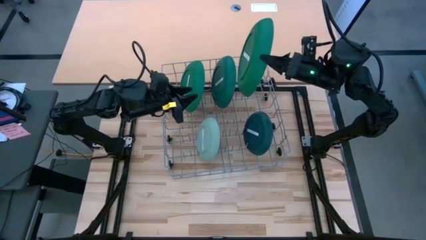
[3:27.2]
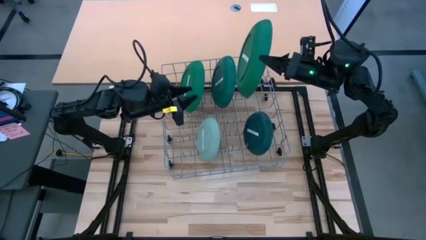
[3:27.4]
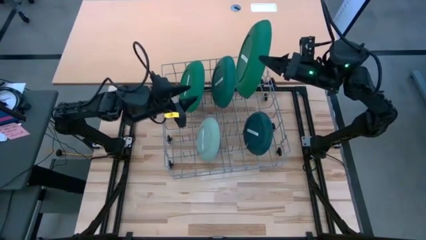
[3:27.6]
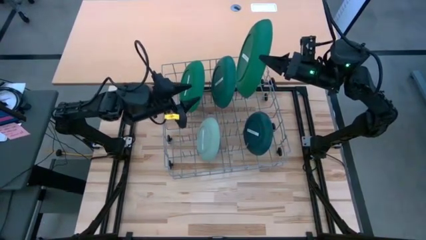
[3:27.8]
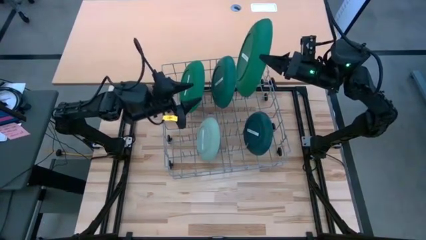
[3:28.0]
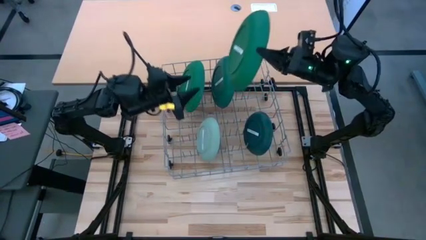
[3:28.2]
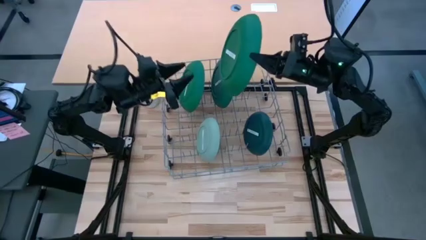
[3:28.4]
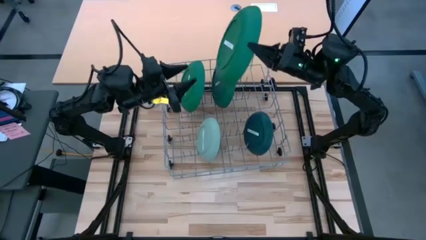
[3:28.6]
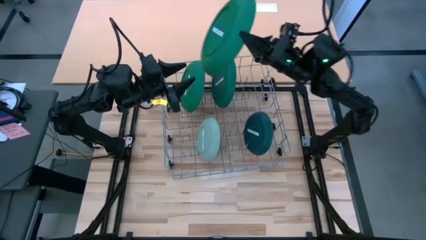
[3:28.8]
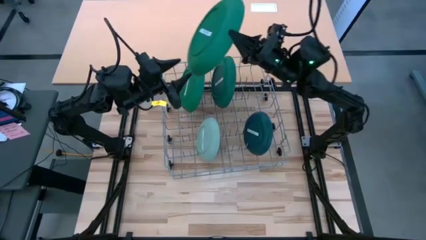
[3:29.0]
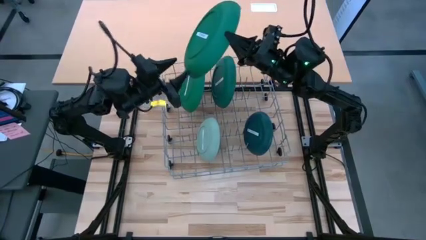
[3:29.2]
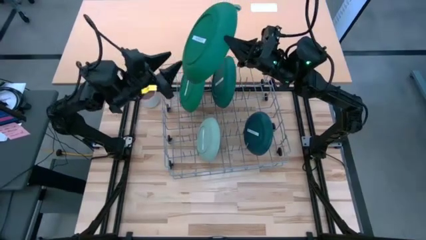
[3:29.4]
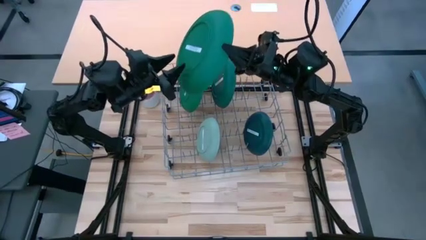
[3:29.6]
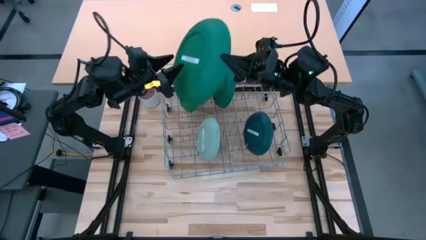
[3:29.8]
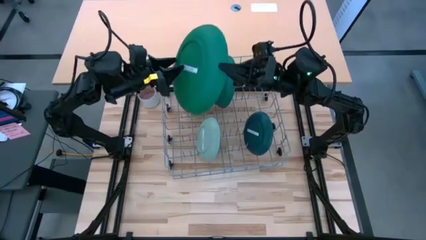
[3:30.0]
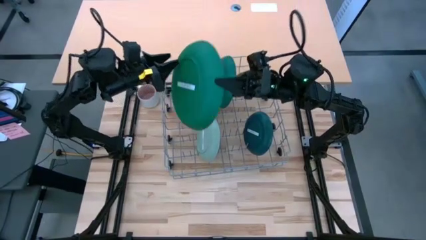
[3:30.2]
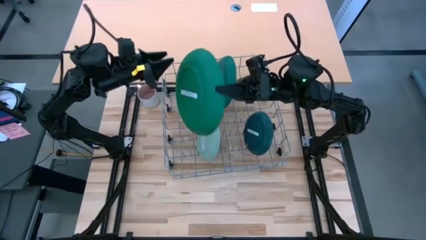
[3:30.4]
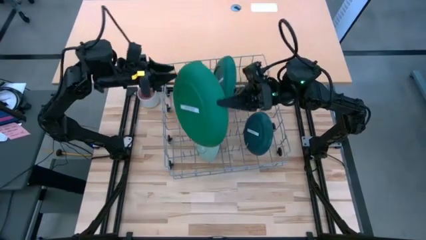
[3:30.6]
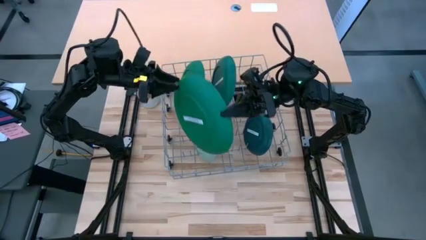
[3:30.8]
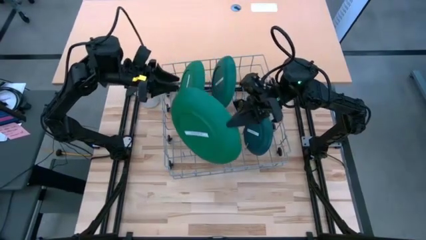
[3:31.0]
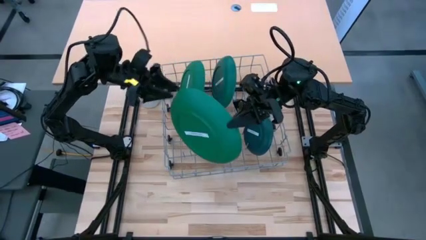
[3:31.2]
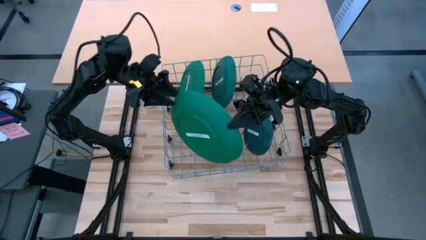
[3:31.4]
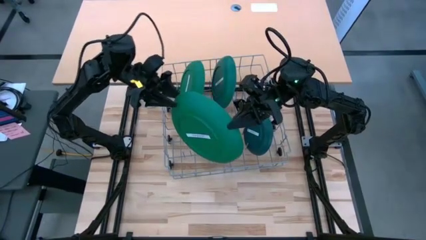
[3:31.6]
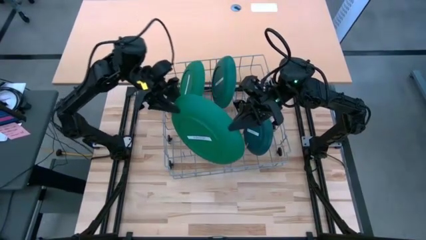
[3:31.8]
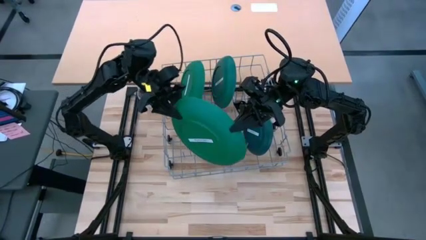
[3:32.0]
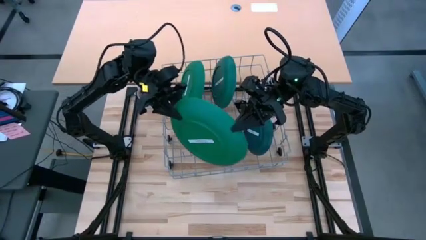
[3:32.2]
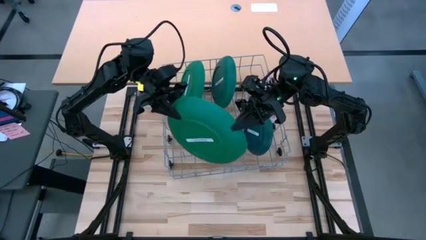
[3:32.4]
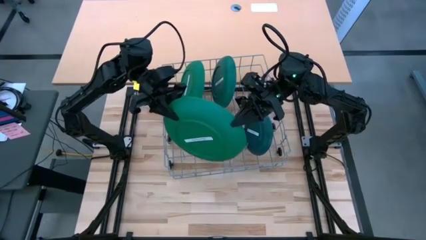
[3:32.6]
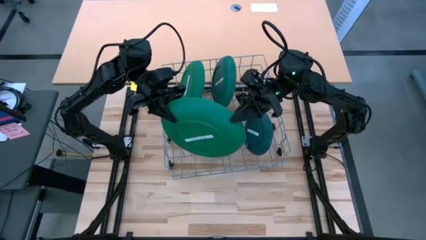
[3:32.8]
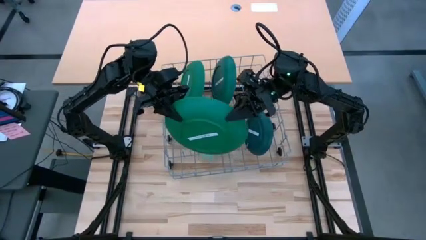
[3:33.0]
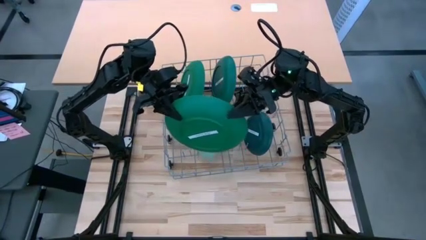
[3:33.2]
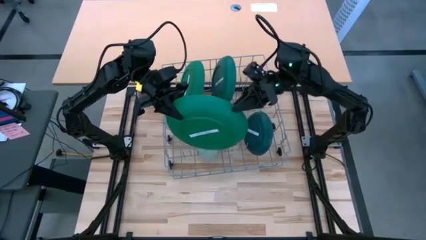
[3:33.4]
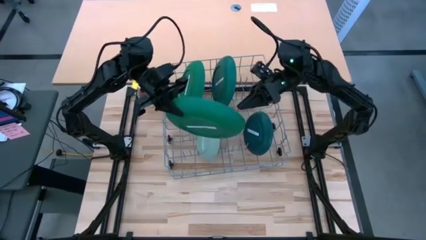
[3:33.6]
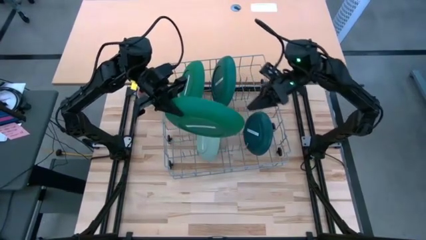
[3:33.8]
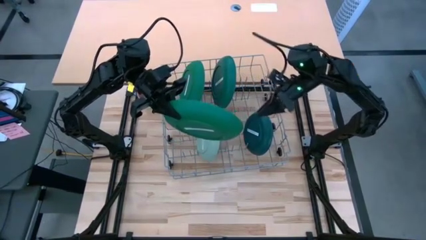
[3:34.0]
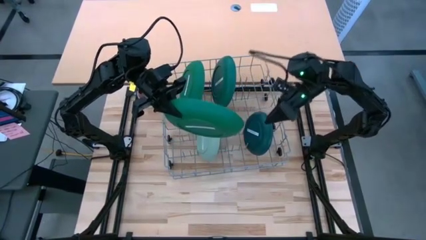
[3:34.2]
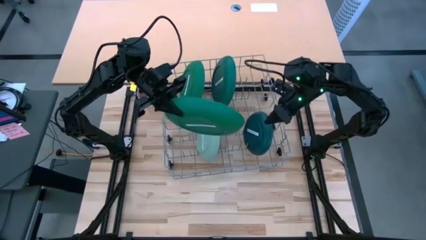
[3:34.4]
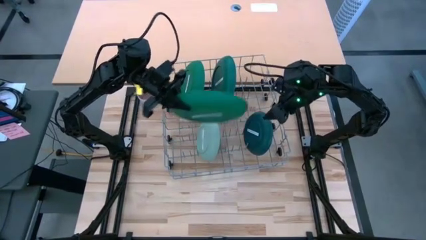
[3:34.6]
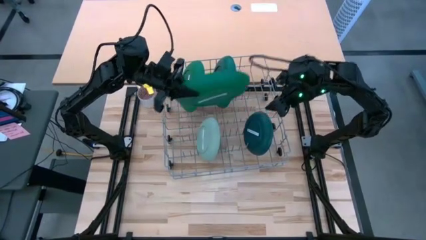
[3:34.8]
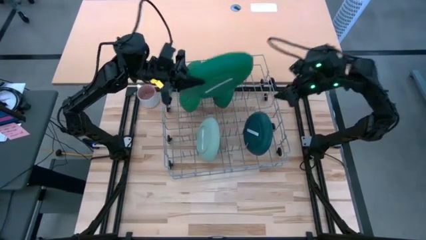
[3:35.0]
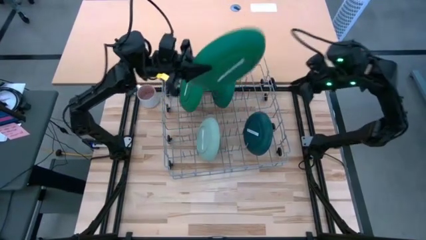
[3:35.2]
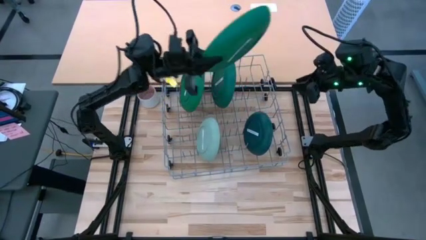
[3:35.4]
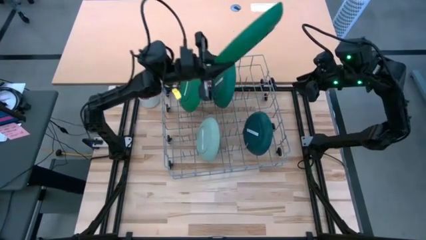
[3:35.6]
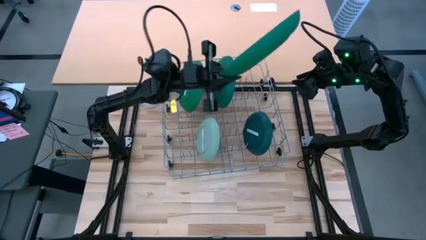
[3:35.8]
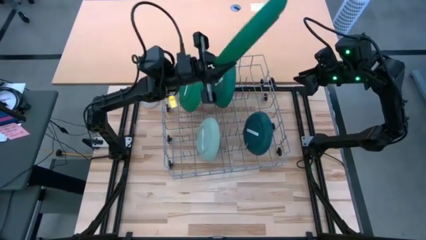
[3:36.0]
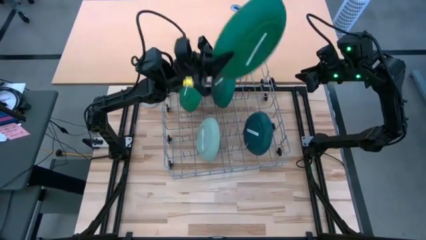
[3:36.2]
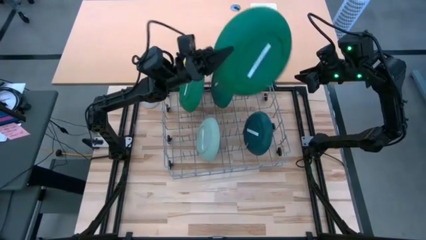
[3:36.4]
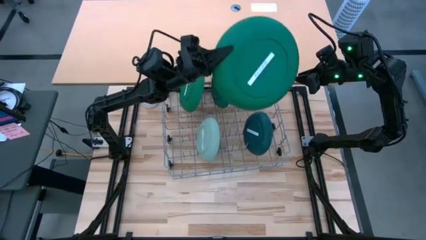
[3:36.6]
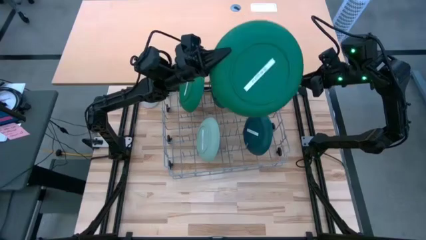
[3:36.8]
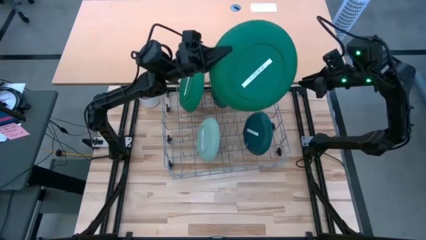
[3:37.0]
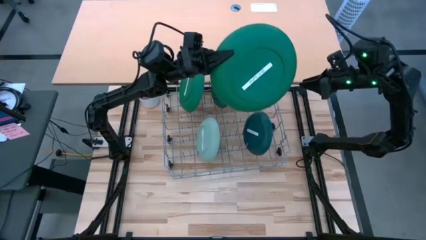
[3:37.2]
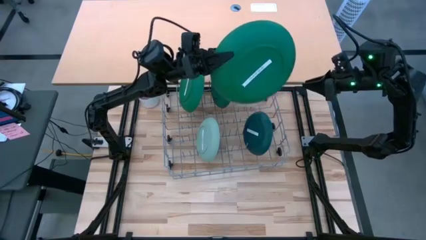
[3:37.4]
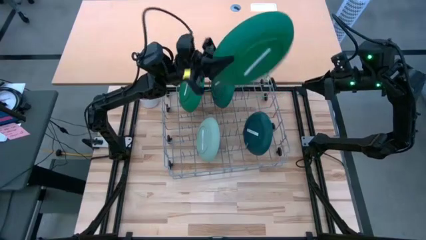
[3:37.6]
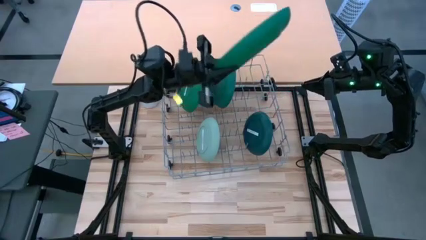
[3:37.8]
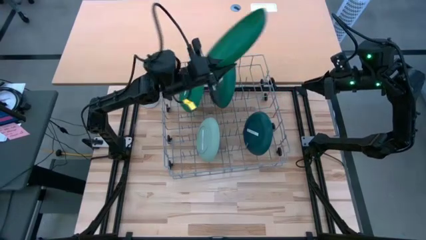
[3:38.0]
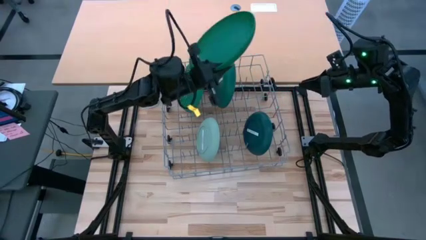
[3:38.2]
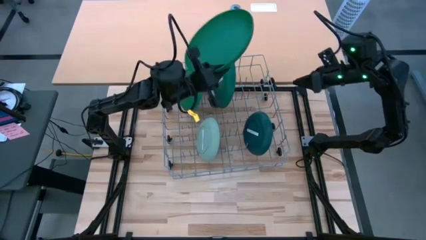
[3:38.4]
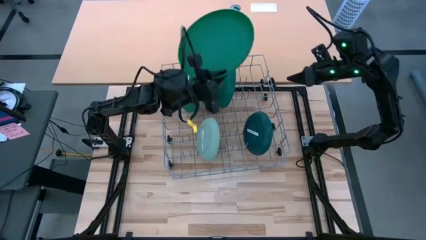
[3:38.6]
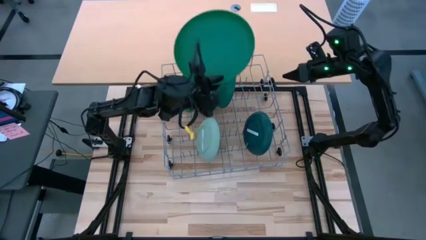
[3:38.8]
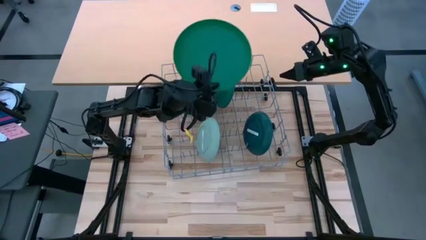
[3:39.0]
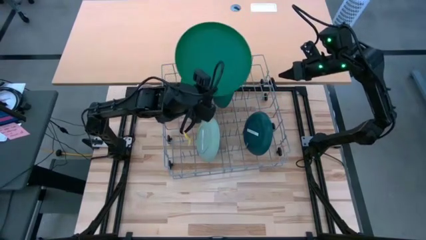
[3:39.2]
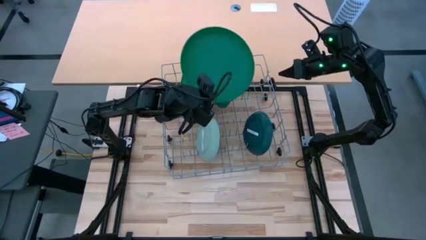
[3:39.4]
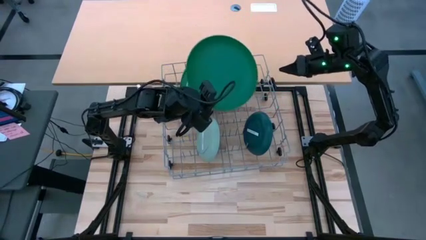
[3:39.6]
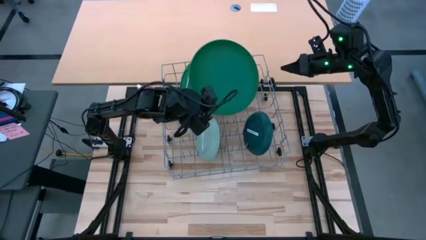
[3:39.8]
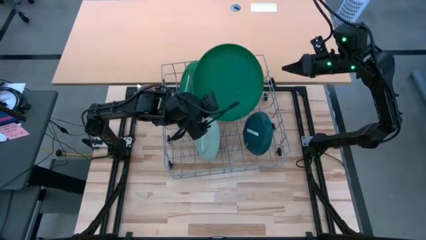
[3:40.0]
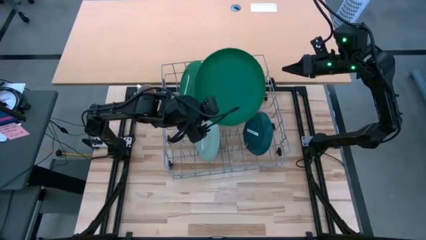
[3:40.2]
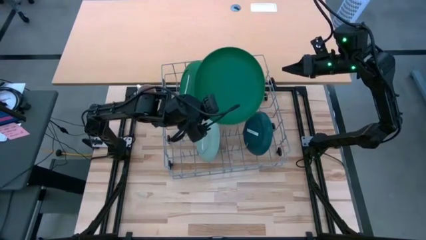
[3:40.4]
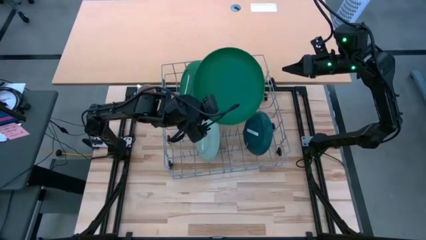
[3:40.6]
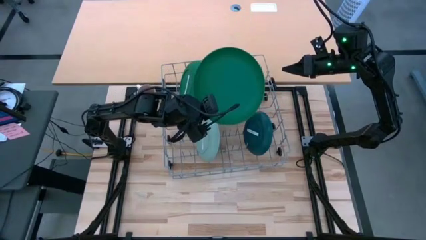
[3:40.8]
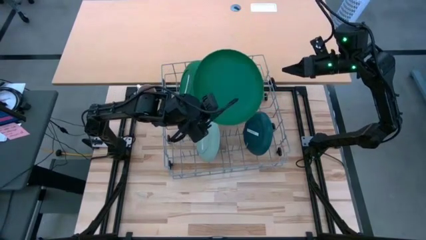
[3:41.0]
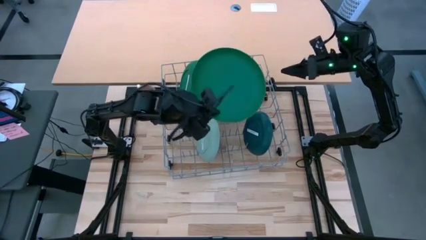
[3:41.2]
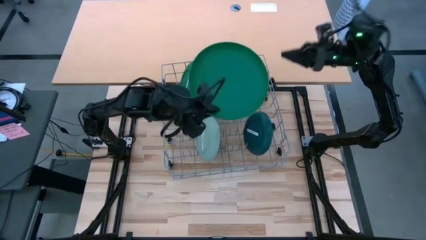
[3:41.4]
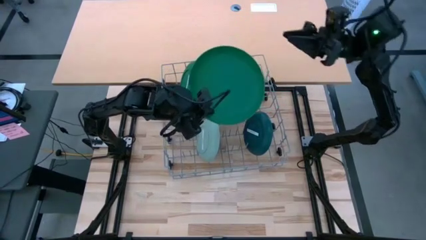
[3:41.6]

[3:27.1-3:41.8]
Task: Sort dishes
Put the green plate in the dish rack
